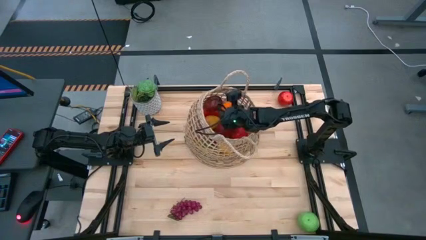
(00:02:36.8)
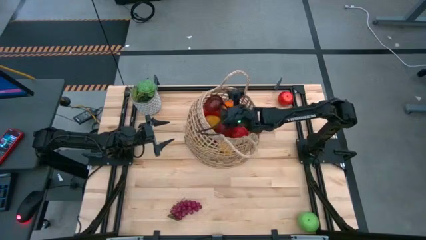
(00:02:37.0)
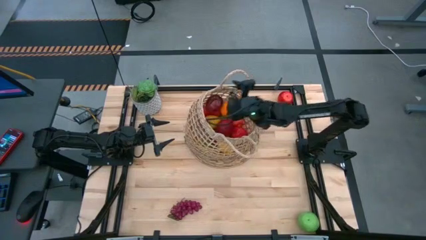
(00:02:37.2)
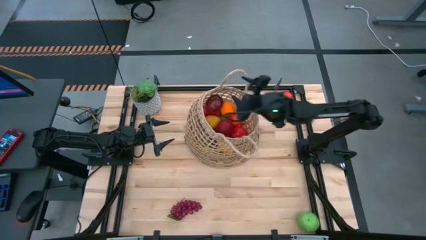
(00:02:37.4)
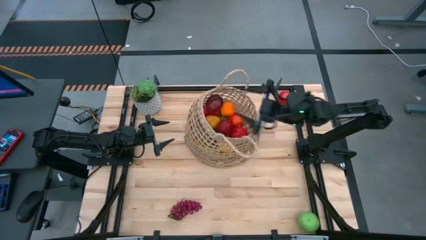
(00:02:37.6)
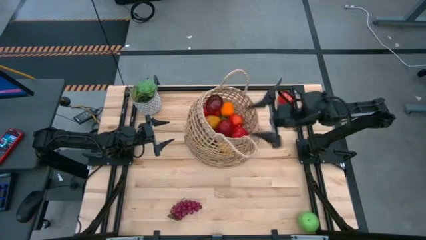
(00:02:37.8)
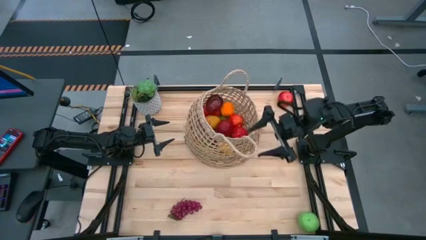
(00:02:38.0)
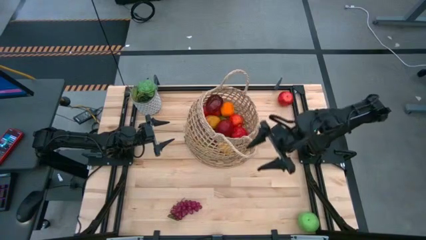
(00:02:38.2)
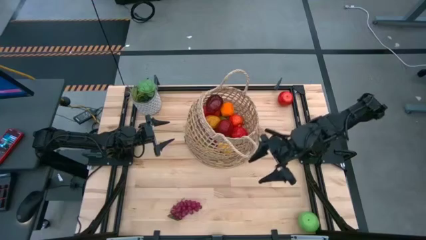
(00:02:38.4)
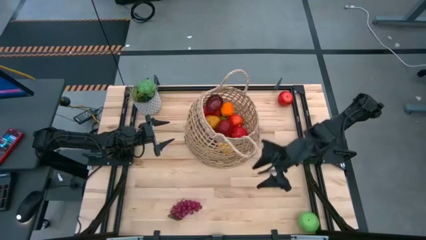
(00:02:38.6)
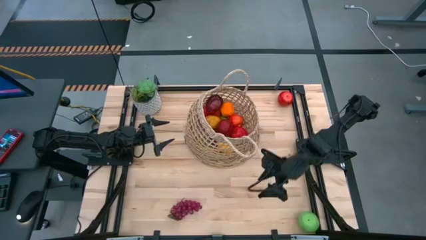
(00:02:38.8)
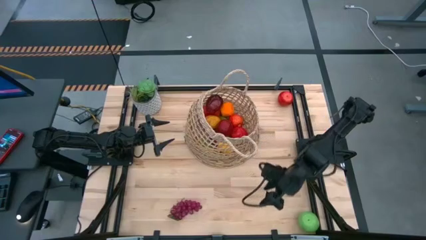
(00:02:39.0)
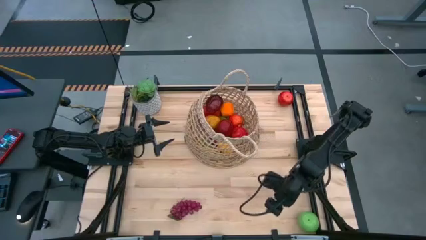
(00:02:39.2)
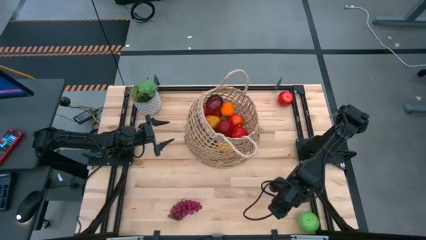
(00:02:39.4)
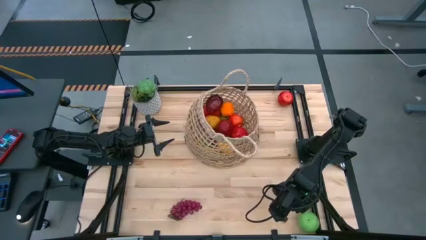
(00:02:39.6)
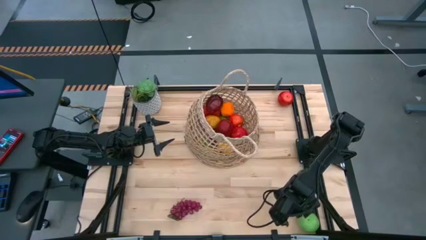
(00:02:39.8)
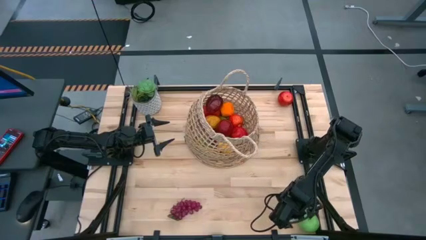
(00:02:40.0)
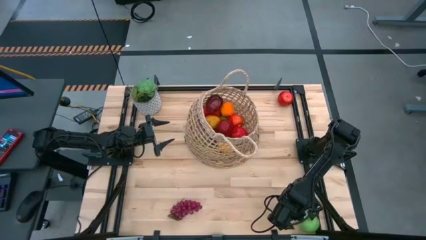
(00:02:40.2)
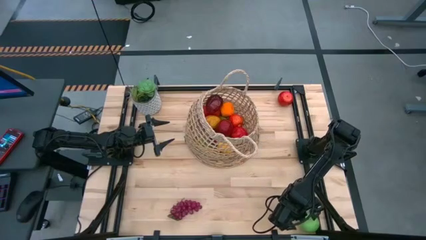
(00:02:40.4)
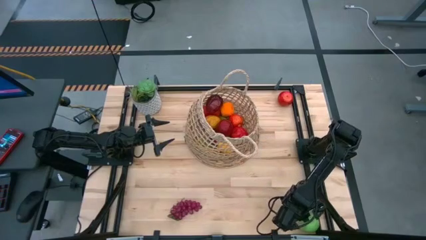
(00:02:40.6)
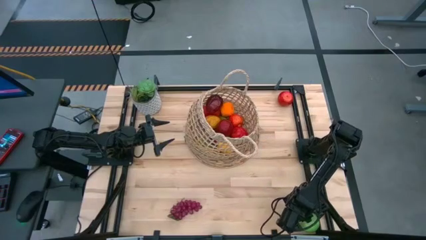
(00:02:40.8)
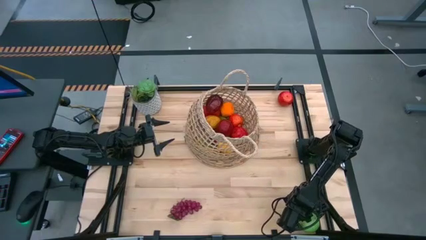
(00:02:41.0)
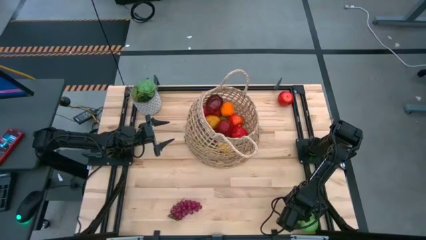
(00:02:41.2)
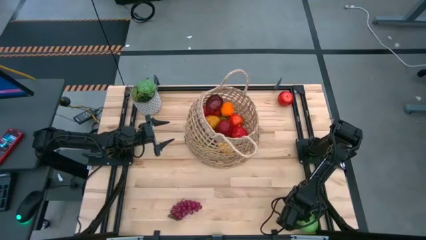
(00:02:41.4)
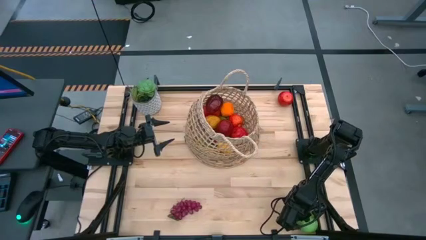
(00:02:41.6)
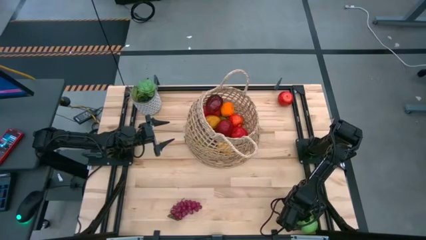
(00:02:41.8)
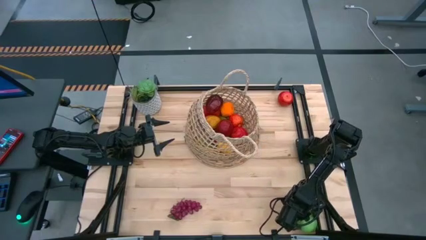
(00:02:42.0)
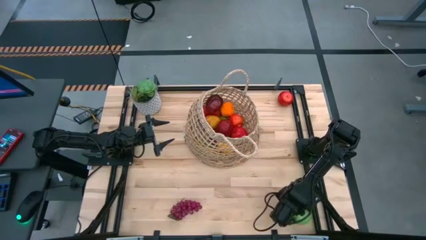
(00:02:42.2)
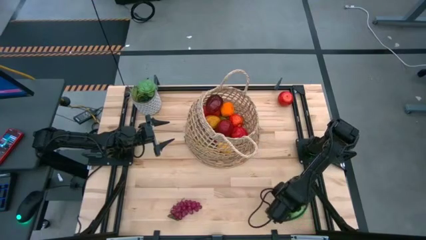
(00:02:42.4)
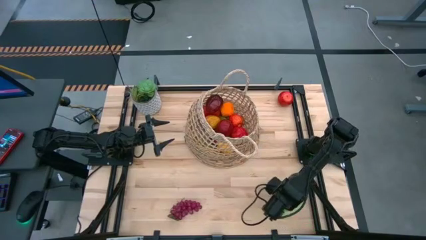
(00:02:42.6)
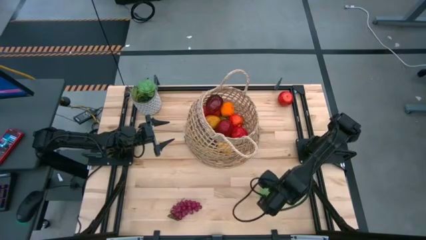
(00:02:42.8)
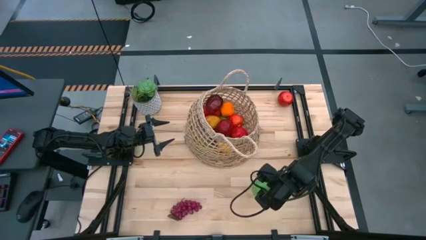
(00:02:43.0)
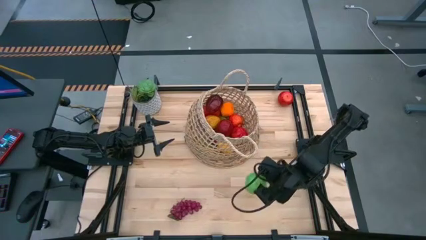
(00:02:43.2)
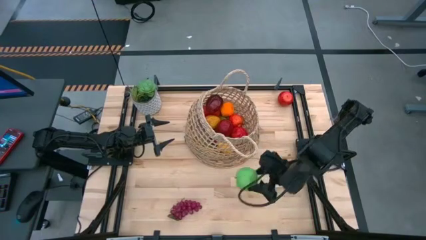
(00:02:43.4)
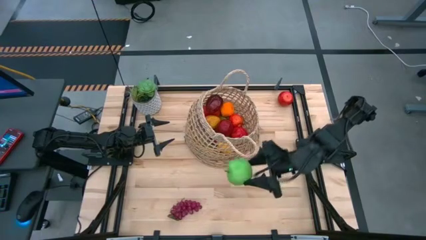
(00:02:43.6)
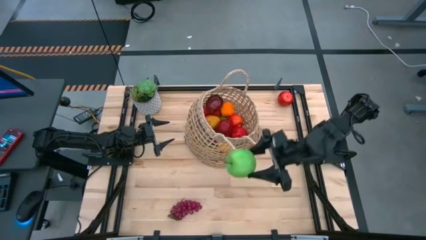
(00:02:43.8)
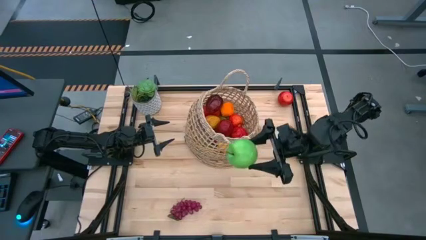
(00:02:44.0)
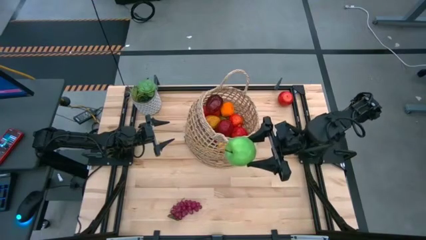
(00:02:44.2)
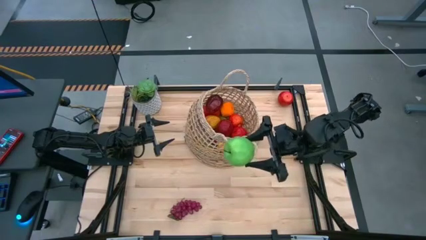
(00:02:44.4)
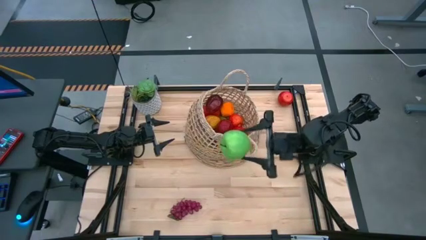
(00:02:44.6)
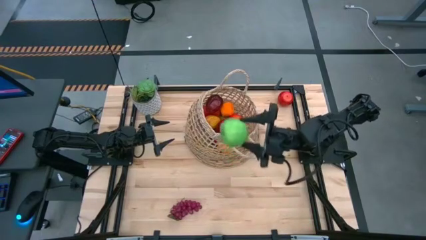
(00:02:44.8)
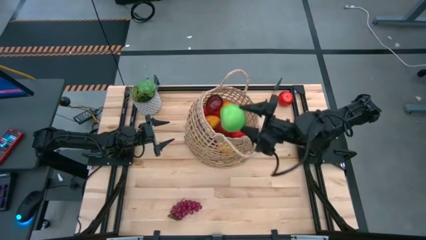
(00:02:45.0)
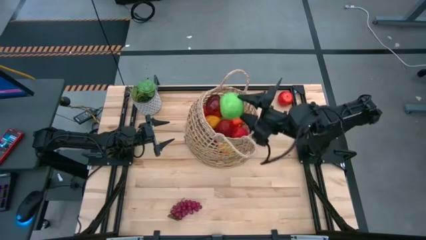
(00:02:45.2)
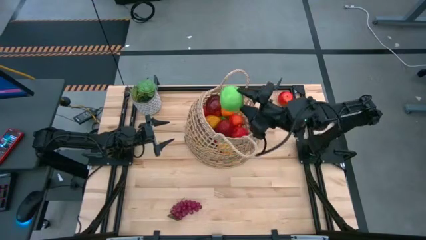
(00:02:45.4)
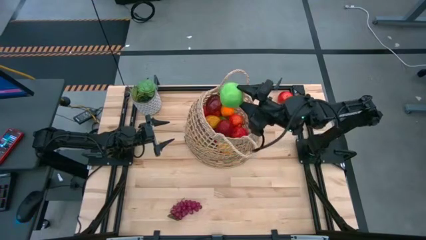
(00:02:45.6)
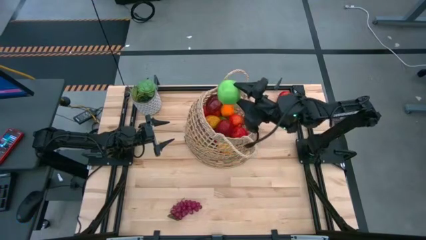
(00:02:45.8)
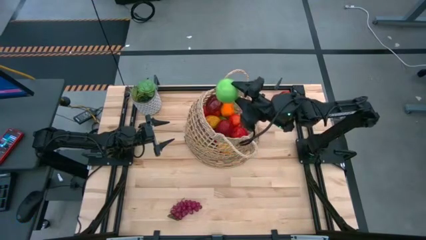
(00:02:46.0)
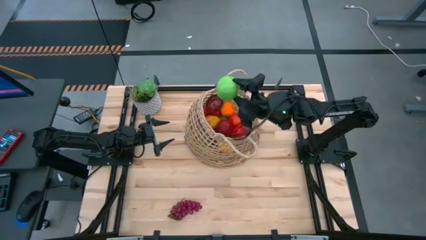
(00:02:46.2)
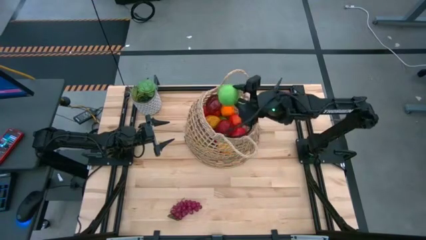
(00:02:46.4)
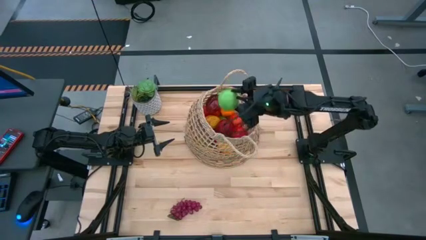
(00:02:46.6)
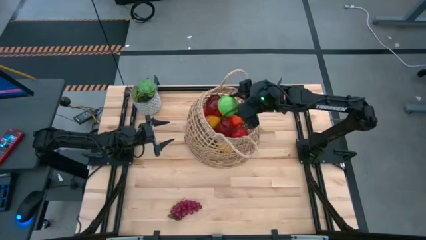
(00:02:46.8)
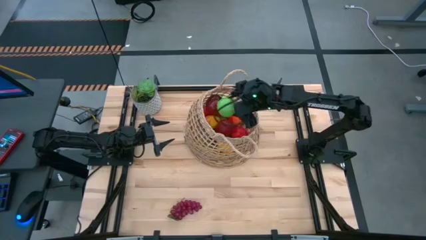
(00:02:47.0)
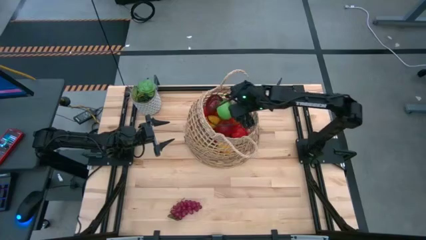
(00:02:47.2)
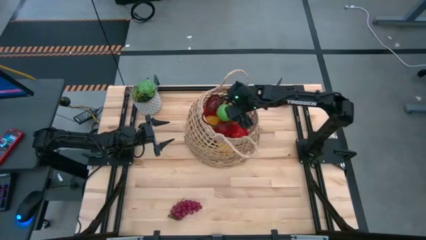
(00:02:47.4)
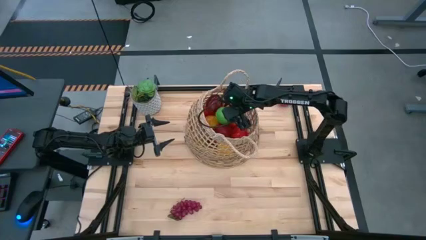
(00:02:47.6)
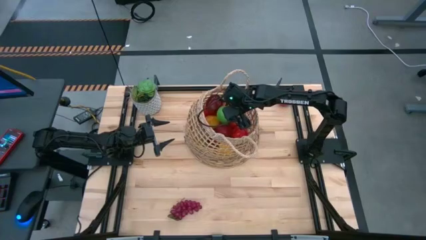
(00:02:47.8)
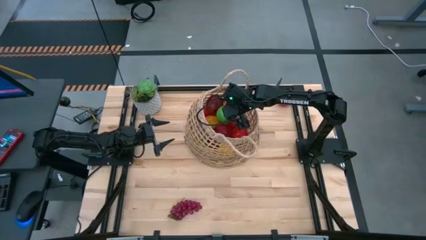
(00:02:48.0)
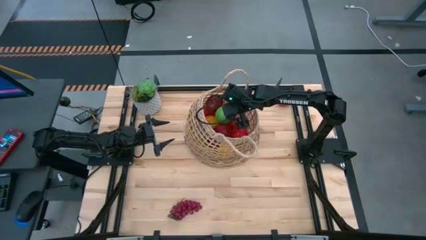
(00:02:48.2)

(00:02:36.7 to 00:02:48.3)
Task: Build produce basket
Put the green apple into the brown basket
